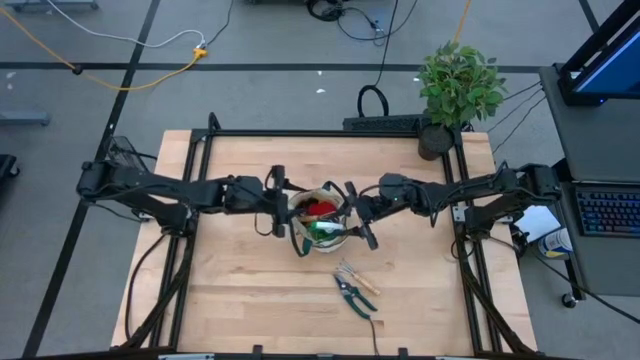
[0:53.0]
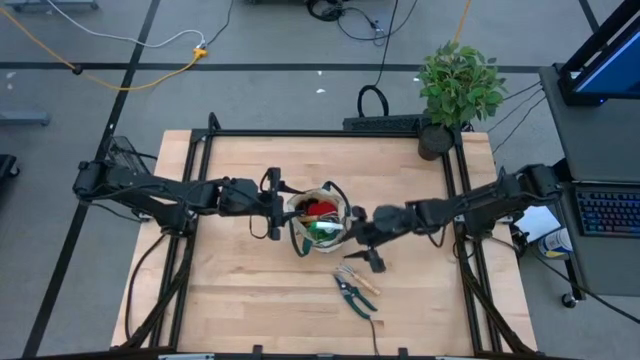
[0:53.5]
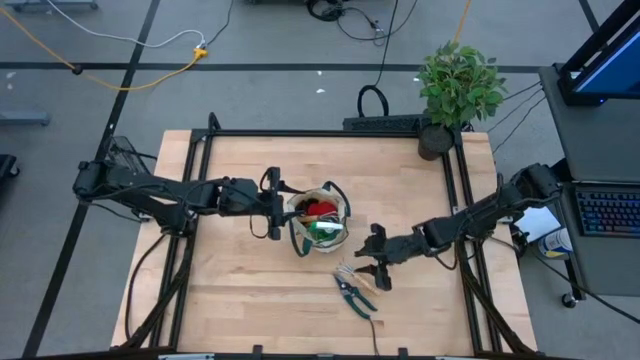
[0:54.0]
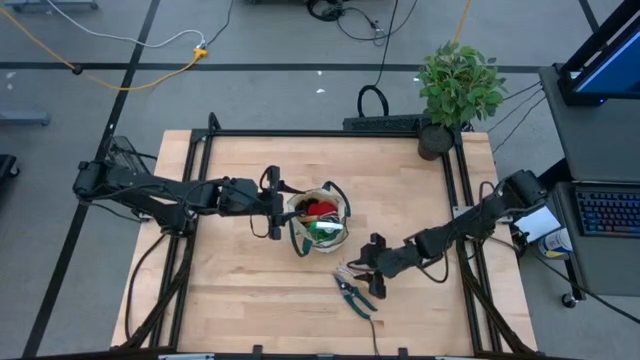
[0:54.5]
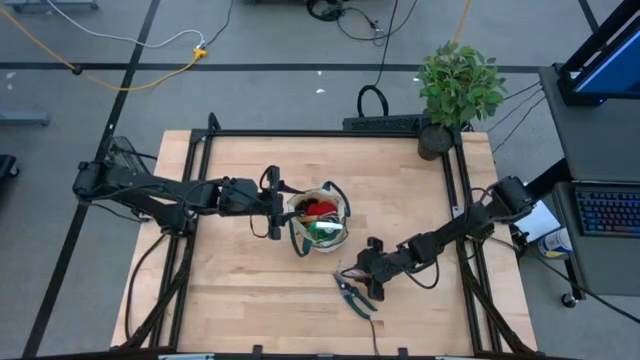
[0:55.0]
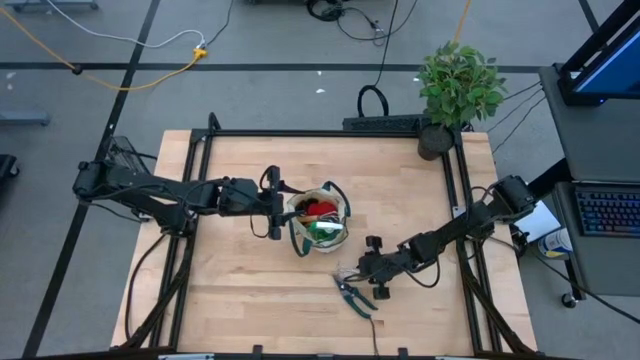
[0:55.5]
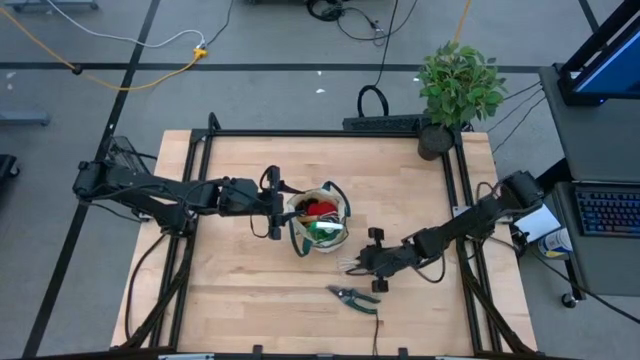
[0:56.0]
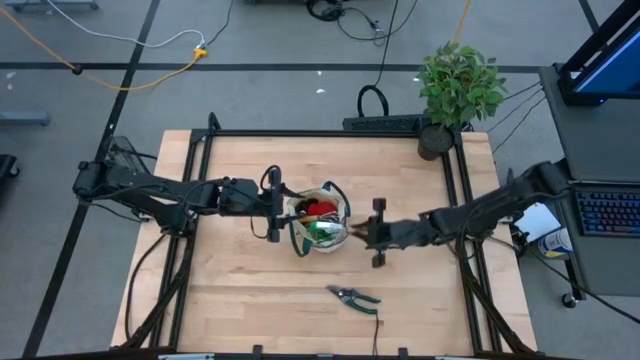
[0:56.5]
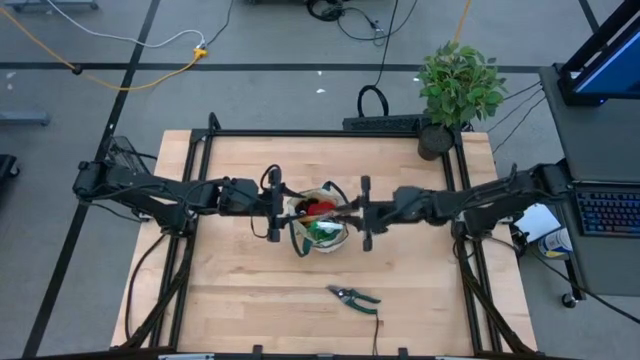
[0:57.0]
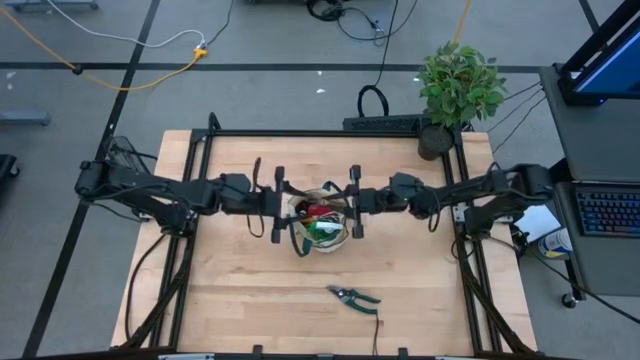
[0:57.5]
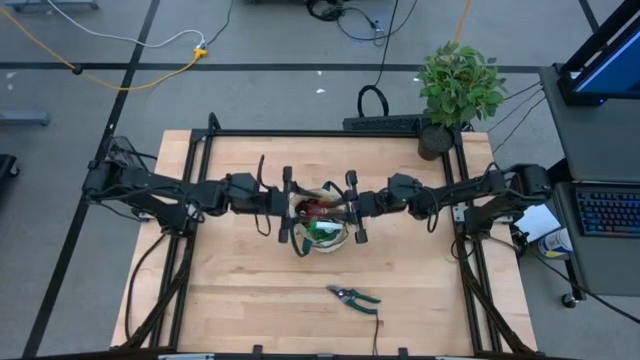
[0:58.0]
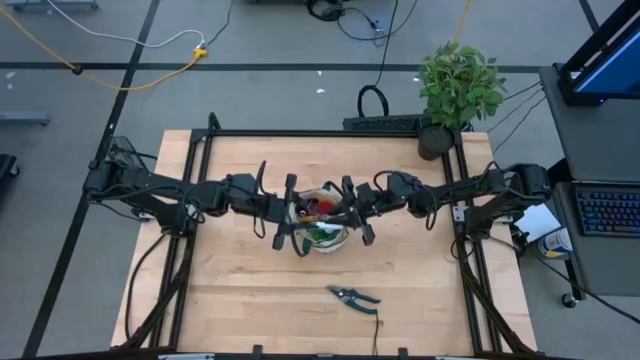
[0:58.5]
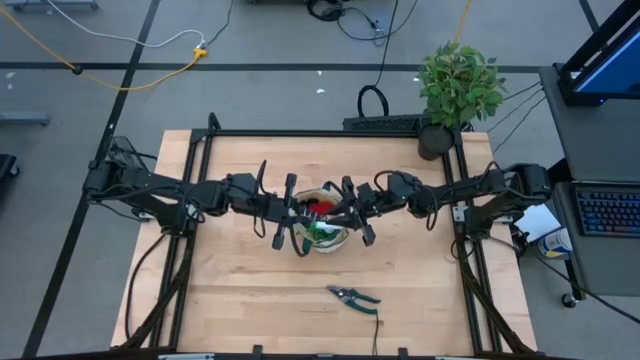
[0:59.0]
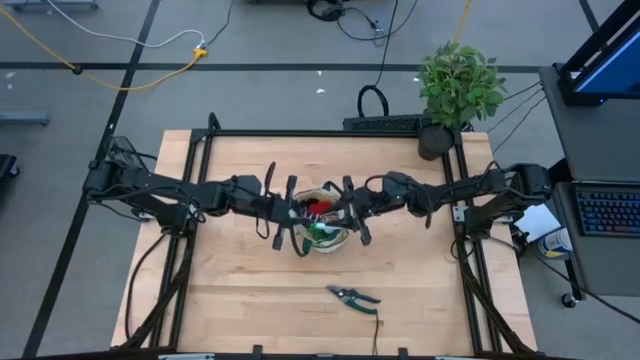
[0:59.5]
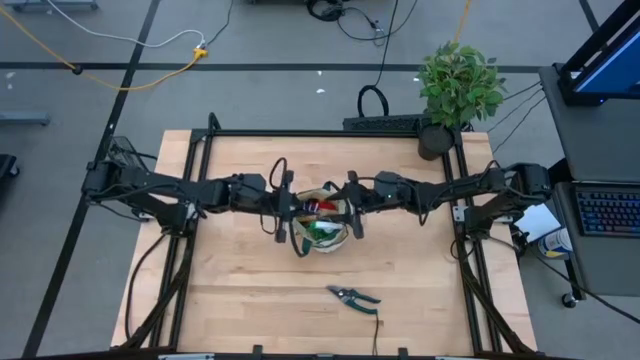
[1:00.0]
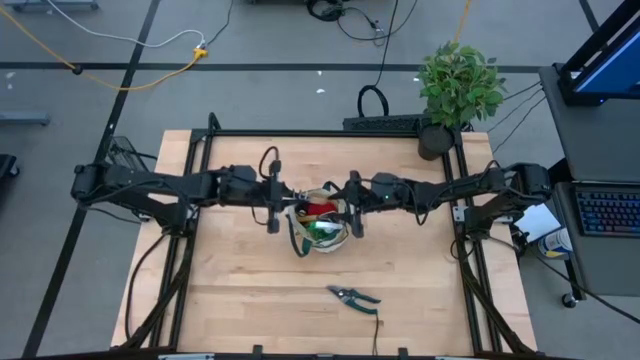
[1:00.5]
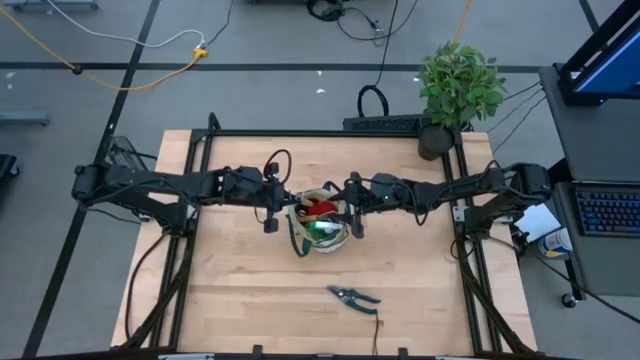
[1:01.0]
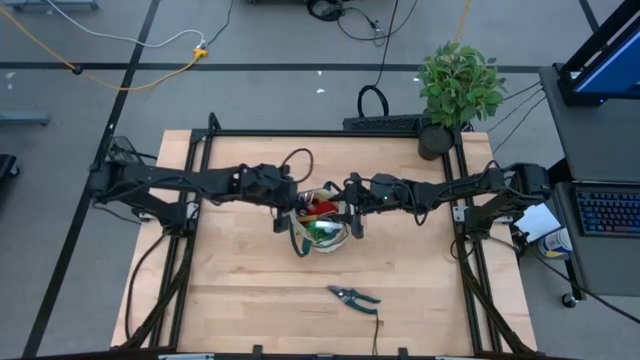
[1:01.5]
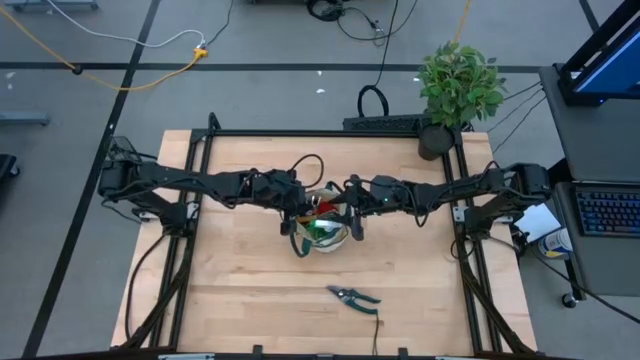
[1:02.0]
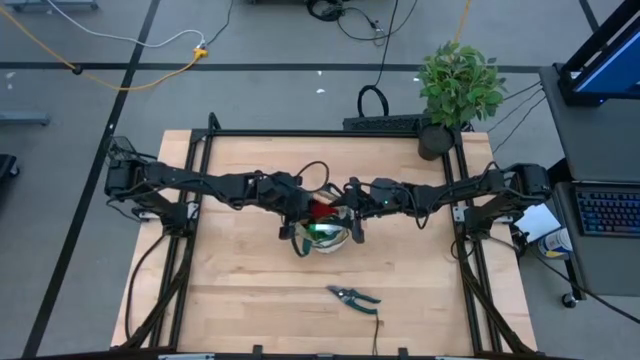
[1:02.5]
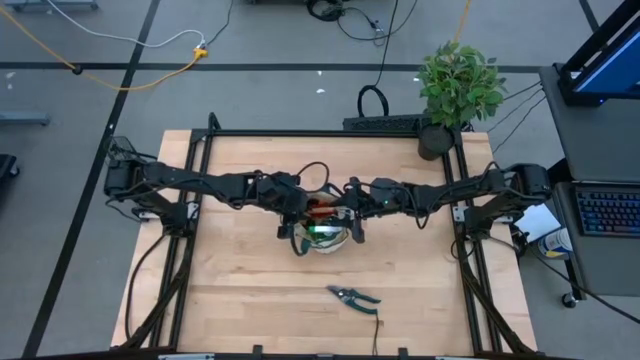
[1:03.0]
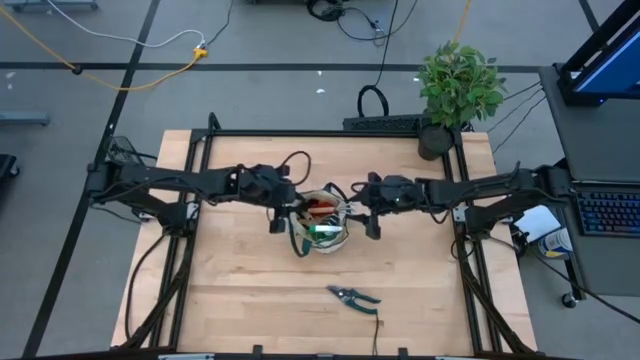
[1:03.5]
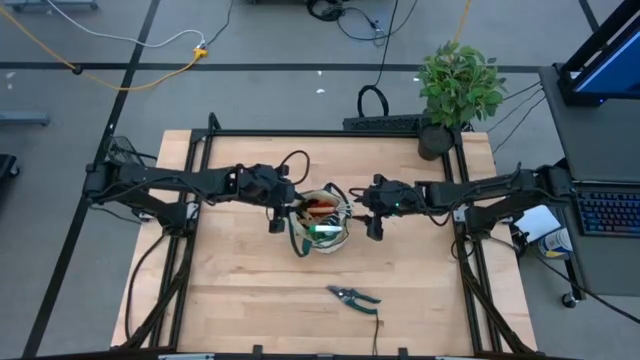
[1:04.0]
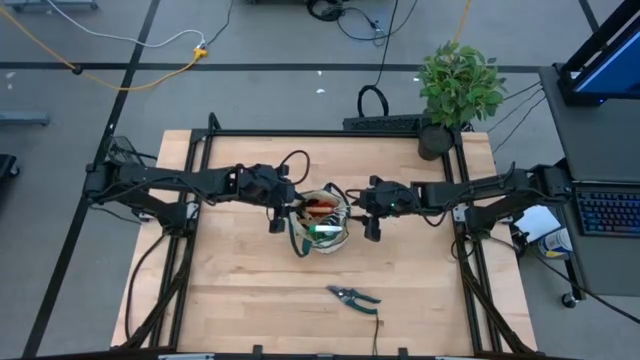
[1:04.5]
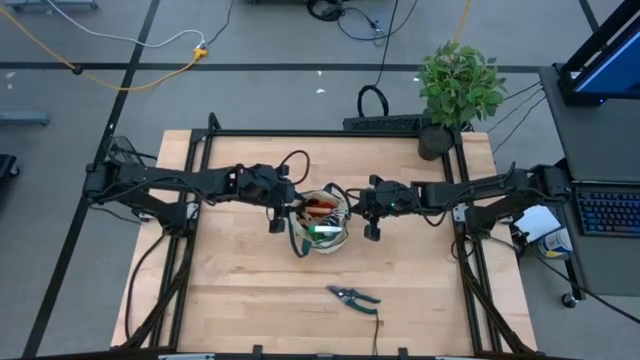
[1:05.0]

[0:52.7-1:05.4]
Task: Pick & Place Garden tools in Gardening bag
Put the brown hand rake into the white gardening bag

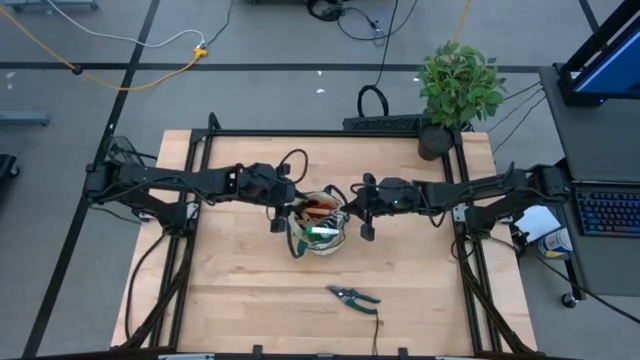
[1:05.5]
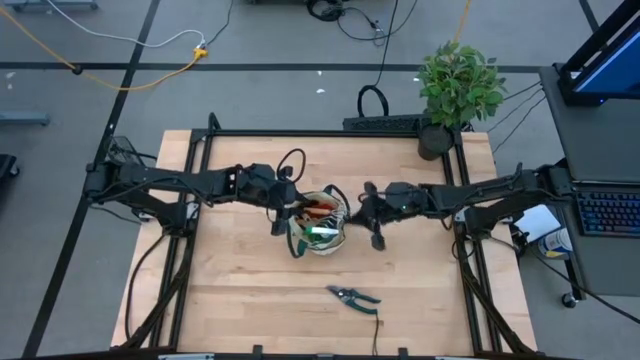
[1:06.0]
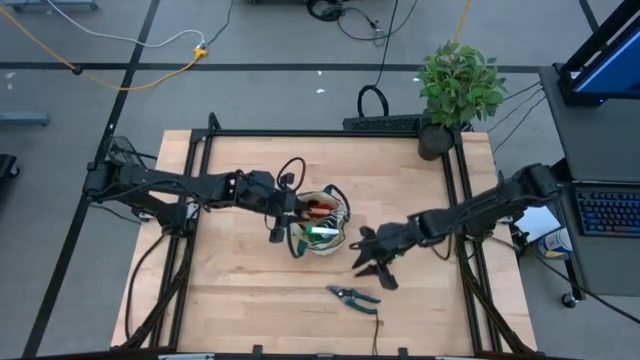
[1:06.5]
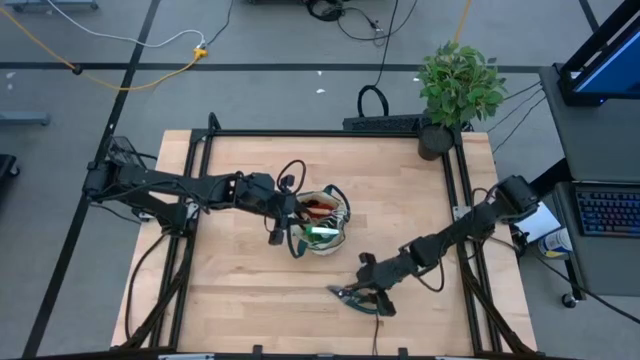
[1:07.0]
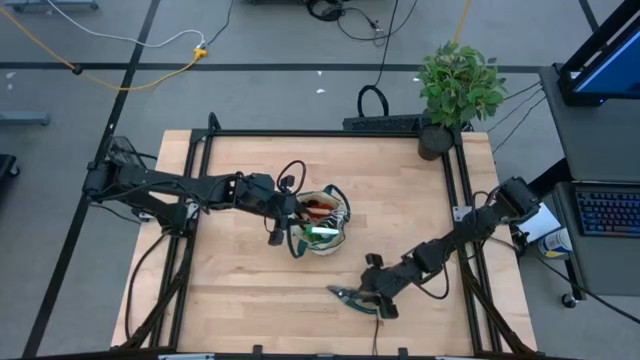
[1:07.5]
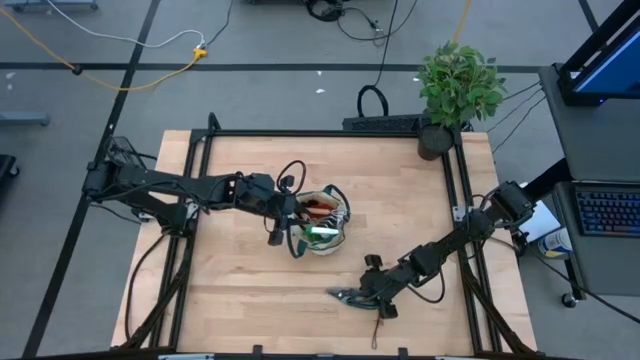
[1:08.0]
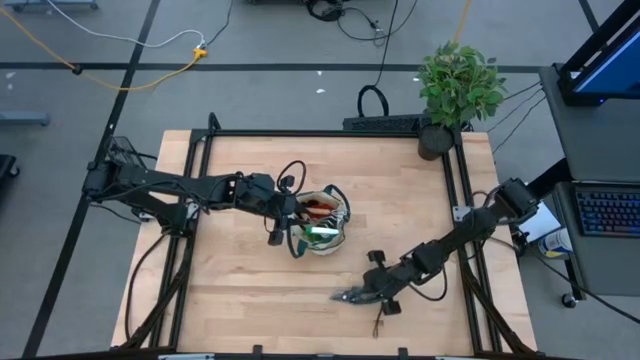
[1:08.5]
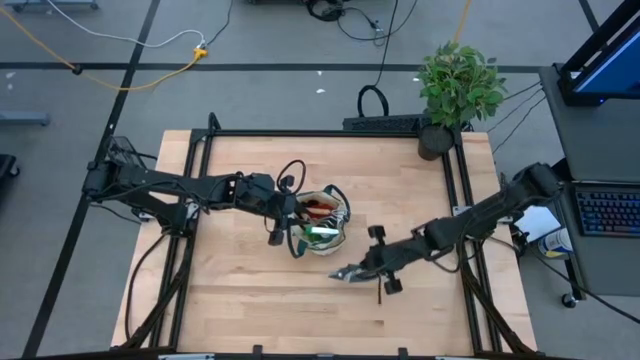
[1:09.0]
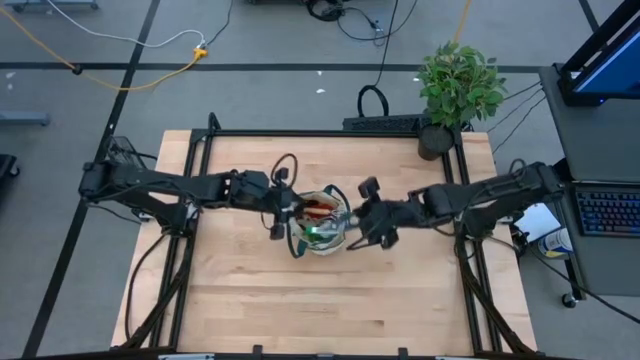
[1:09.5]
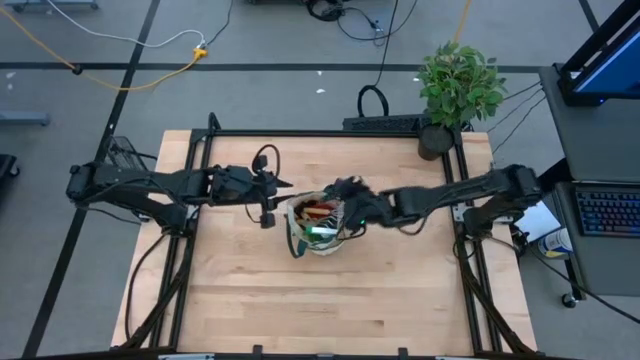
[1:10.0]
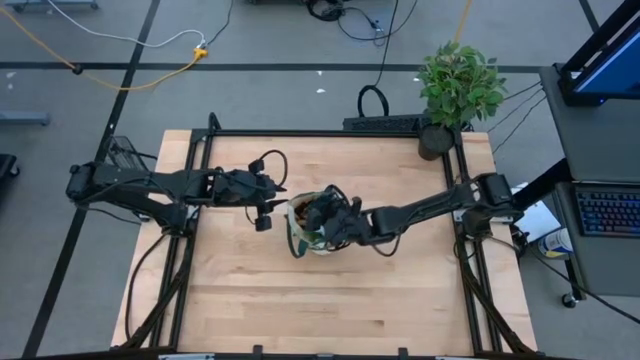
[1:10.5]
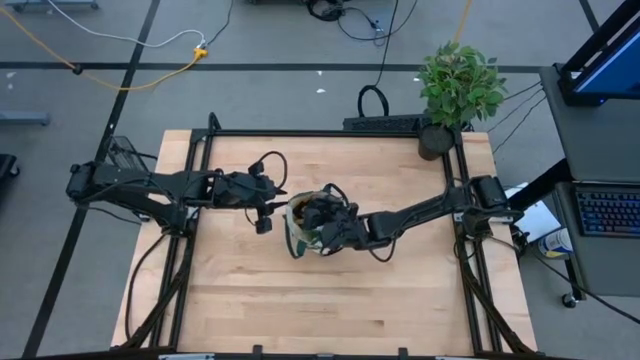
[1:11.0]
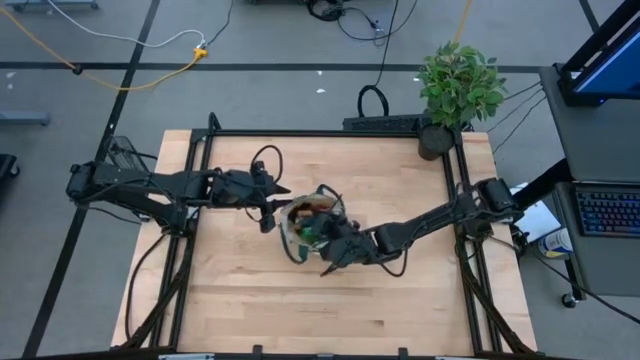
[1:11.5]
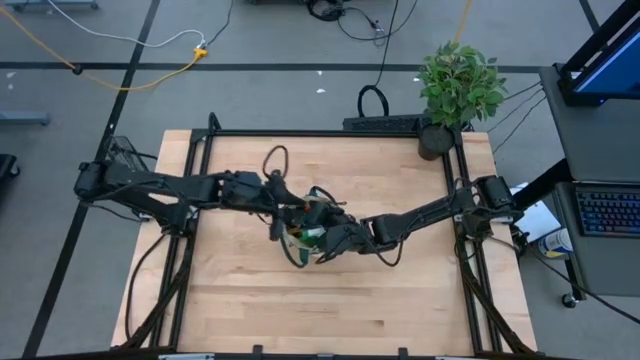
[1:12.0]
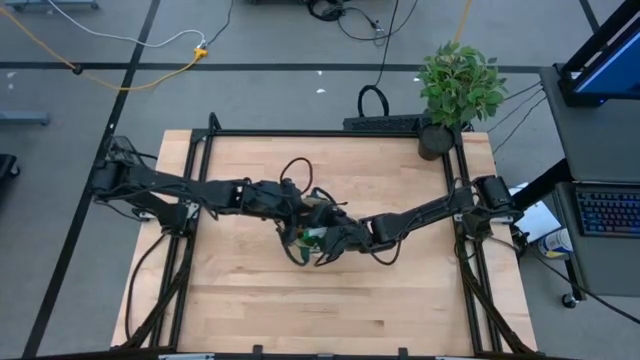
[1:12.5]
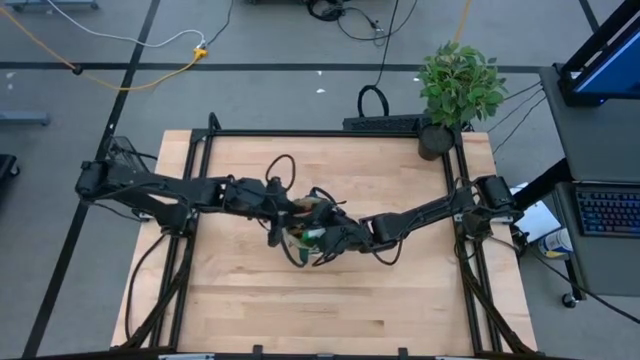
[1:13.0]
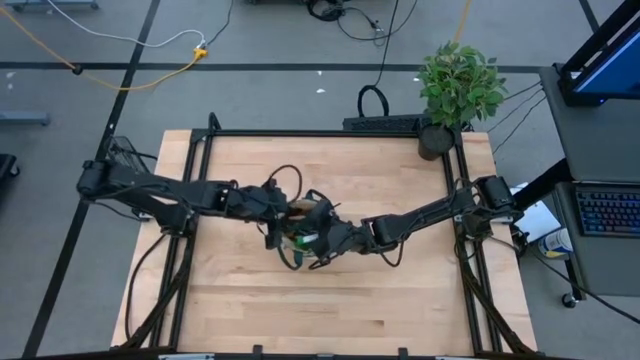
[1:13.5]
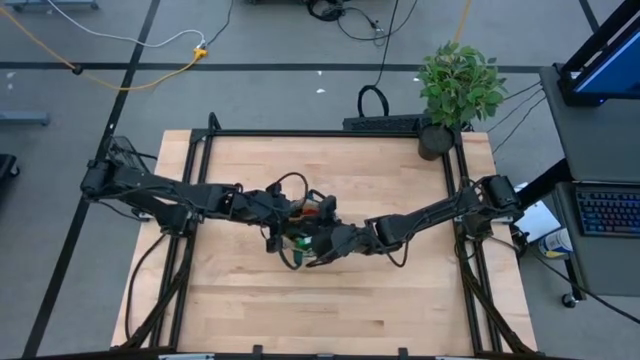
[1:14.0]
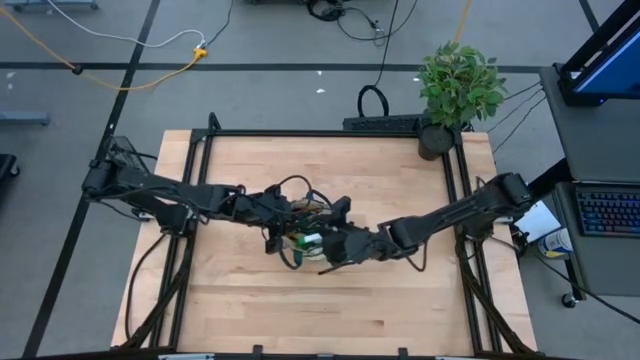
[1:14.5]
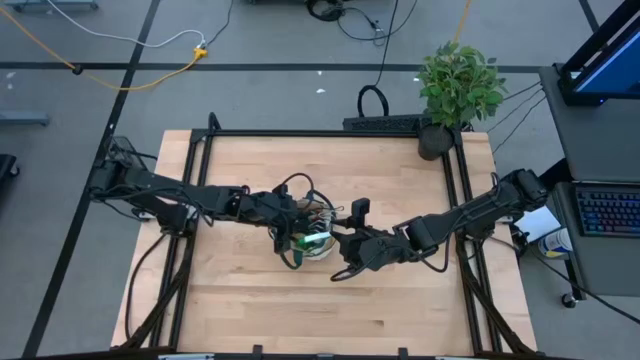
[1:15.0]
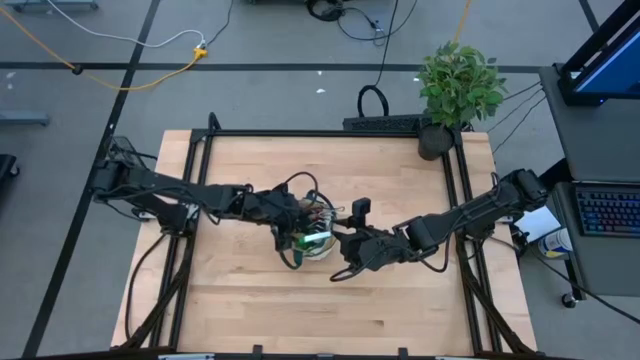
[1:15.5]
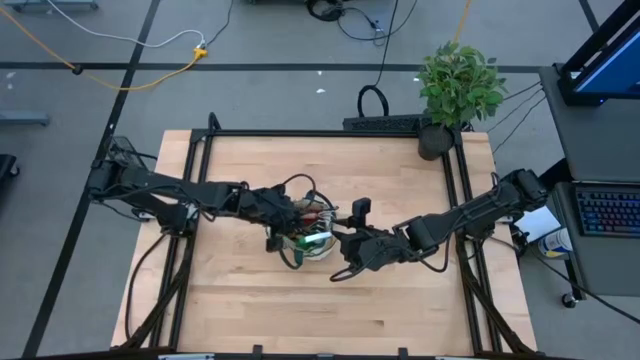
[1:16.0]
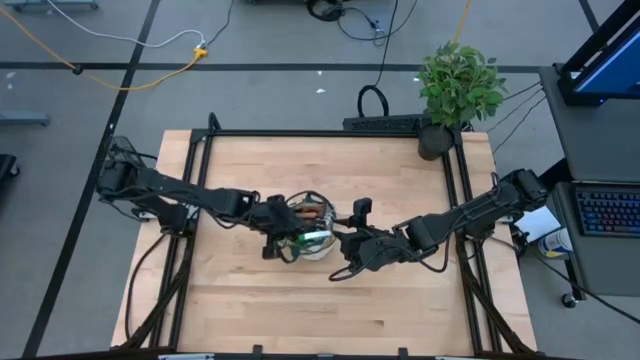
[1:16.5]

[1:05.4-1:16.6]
Put the green shear scissors into the white gardening bag
